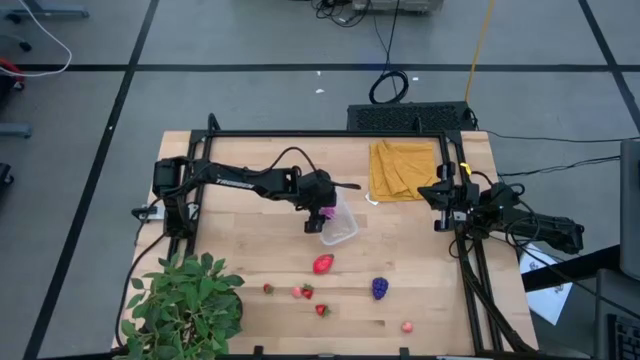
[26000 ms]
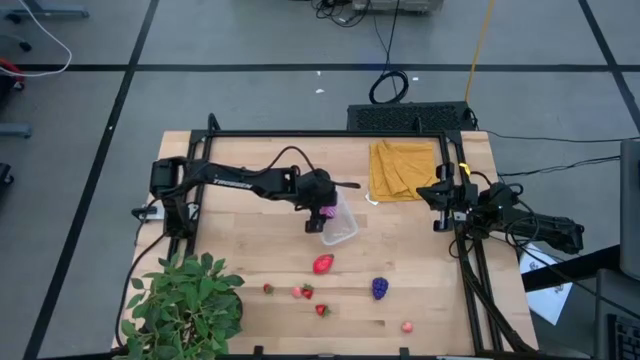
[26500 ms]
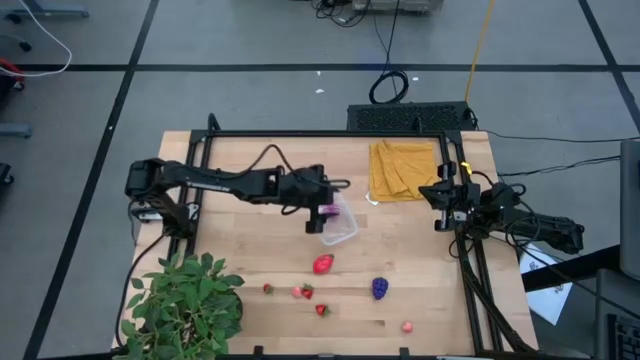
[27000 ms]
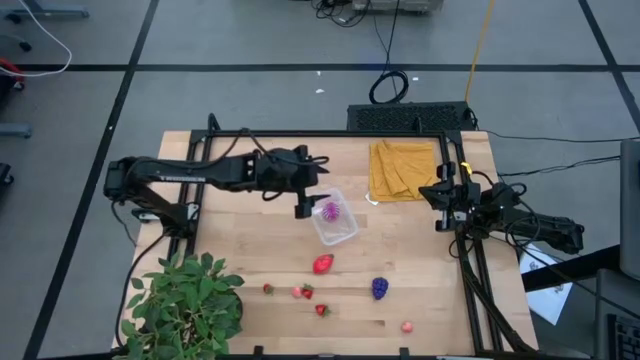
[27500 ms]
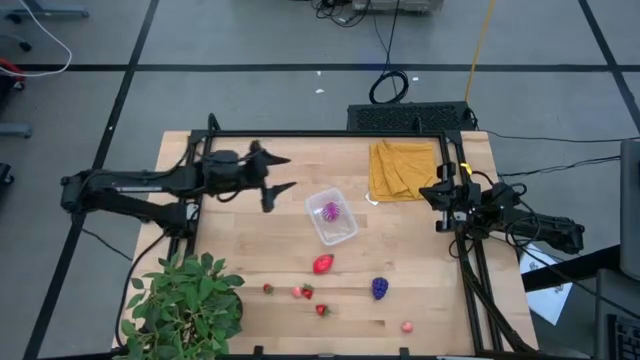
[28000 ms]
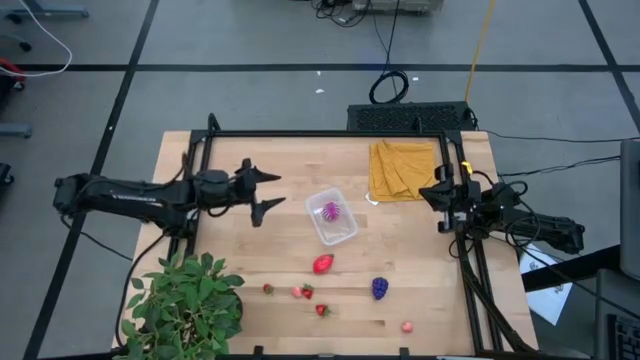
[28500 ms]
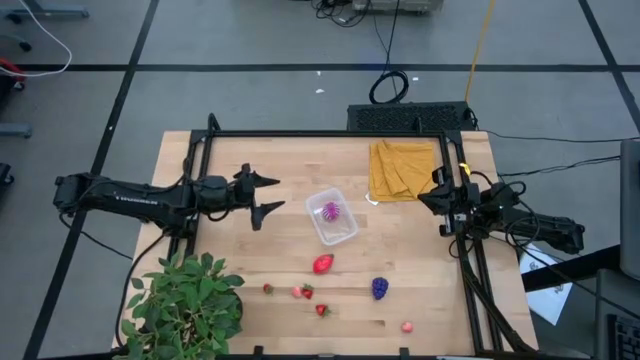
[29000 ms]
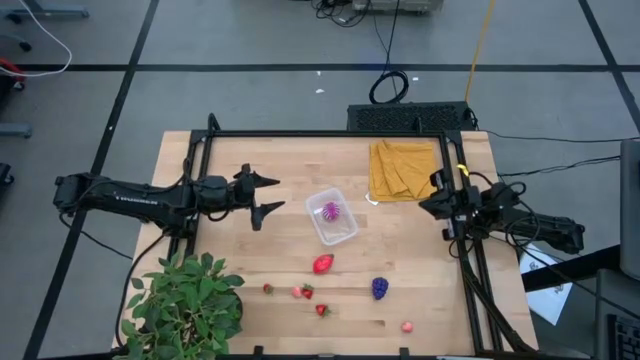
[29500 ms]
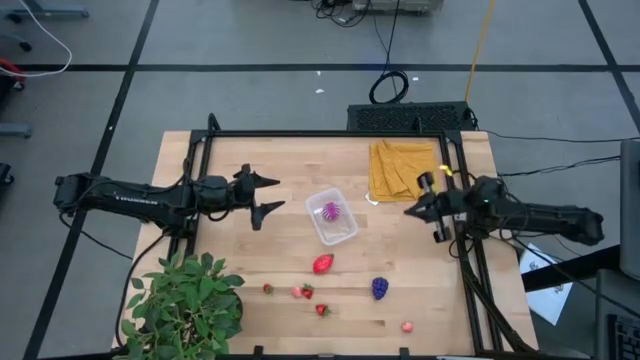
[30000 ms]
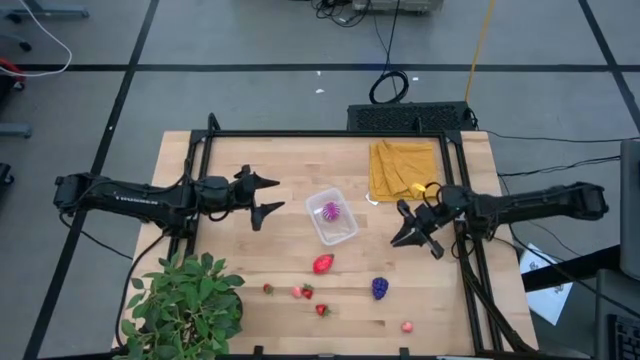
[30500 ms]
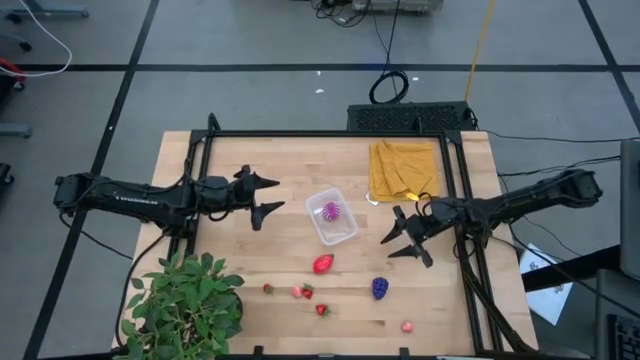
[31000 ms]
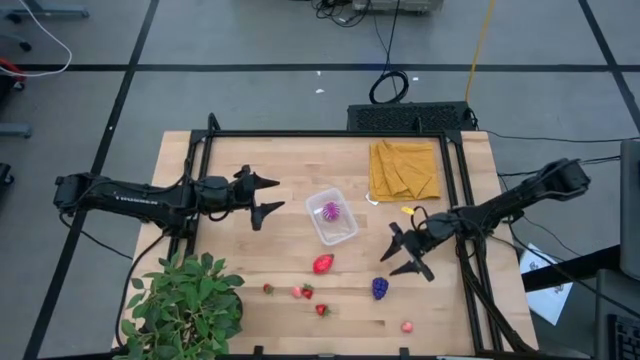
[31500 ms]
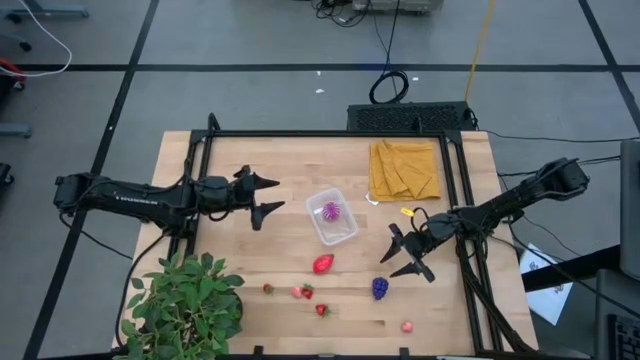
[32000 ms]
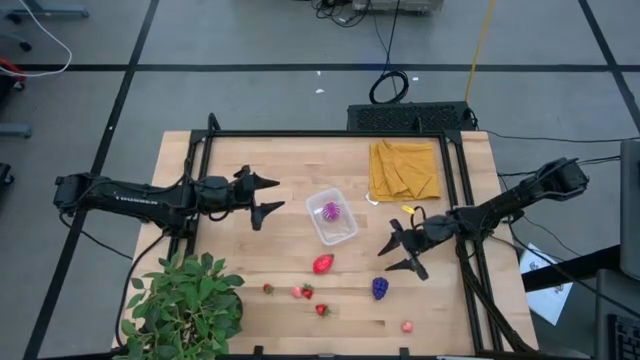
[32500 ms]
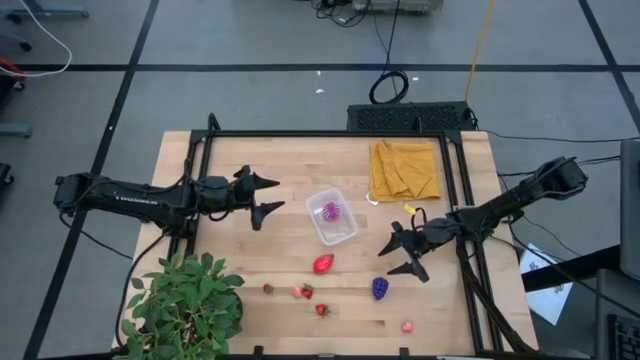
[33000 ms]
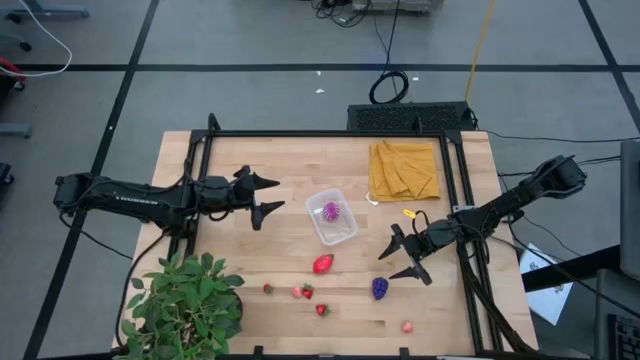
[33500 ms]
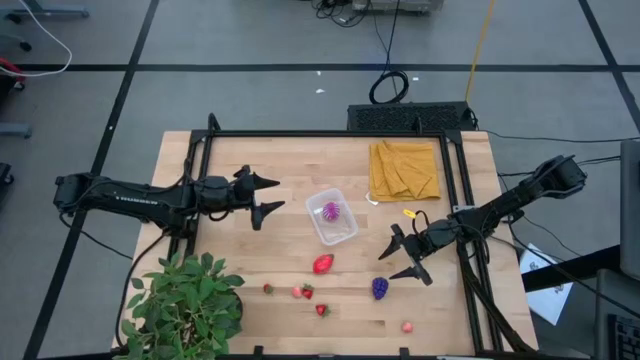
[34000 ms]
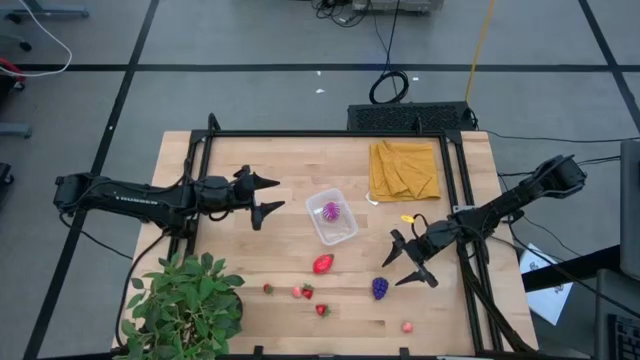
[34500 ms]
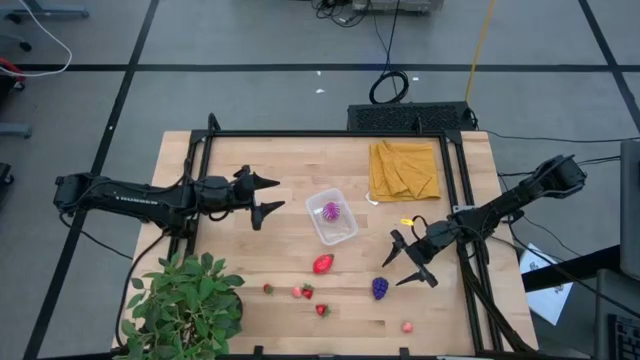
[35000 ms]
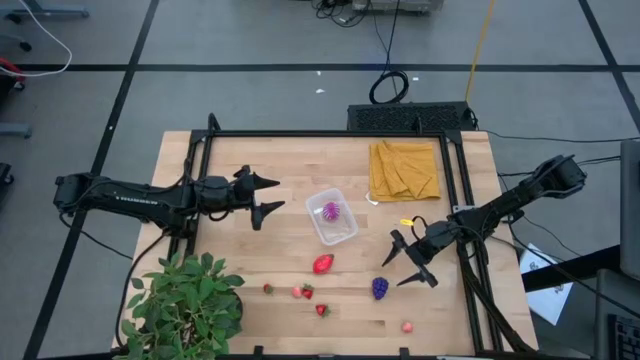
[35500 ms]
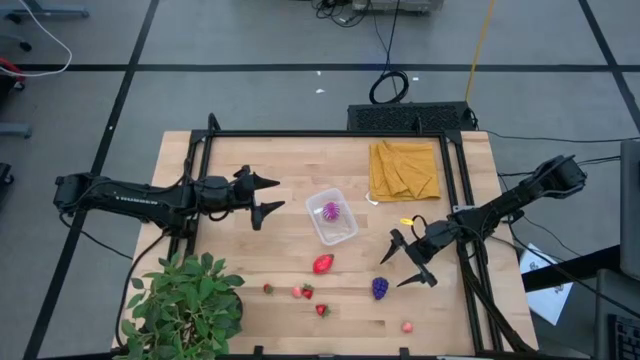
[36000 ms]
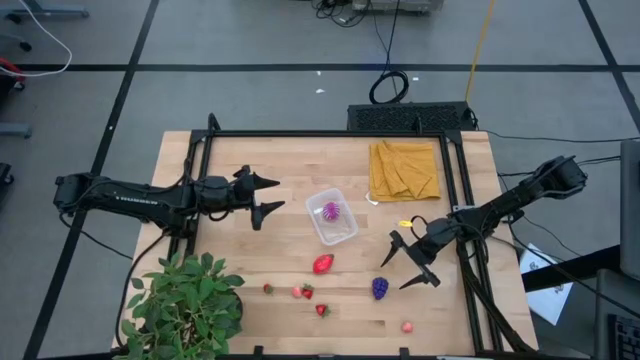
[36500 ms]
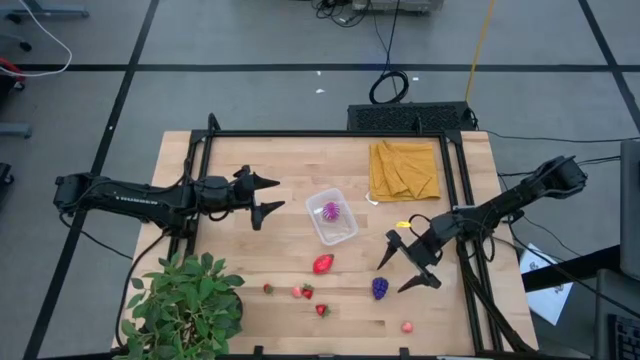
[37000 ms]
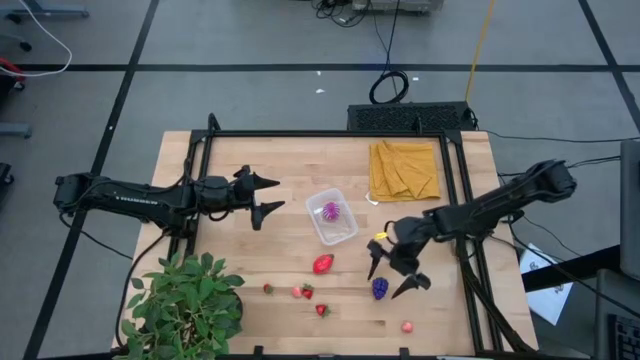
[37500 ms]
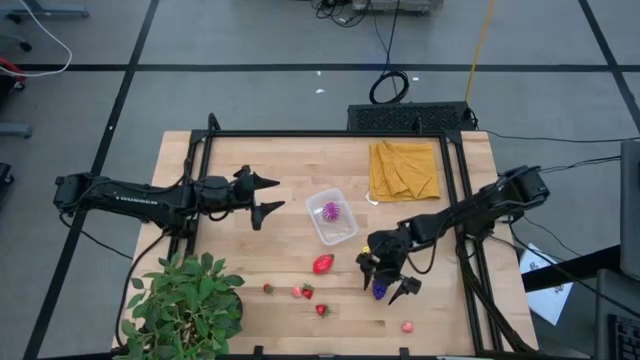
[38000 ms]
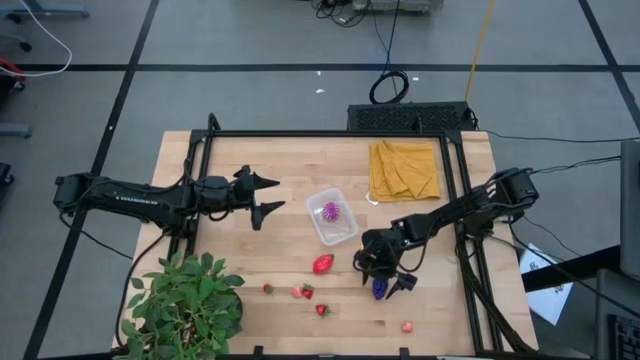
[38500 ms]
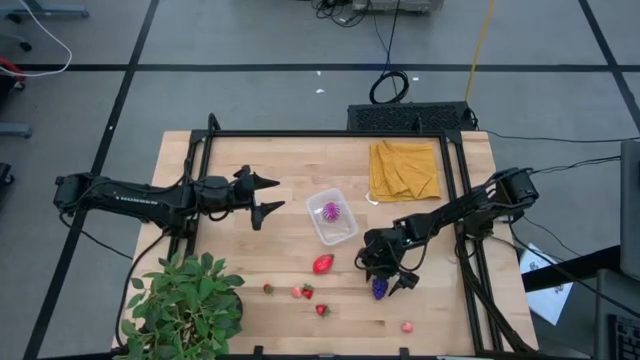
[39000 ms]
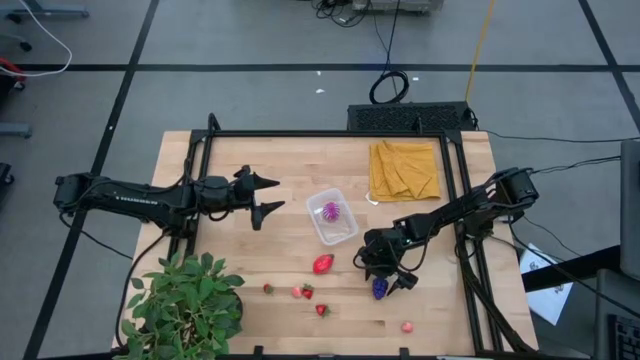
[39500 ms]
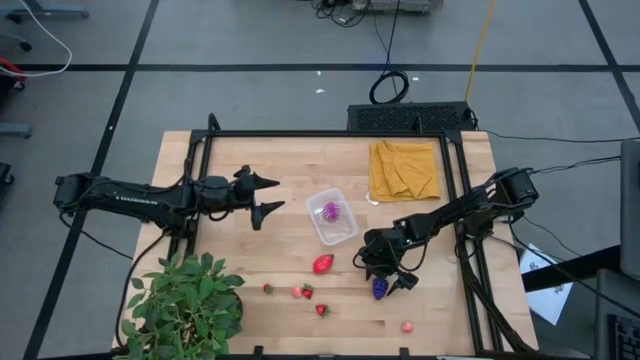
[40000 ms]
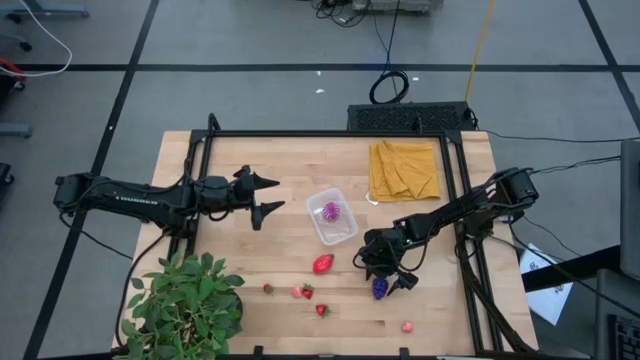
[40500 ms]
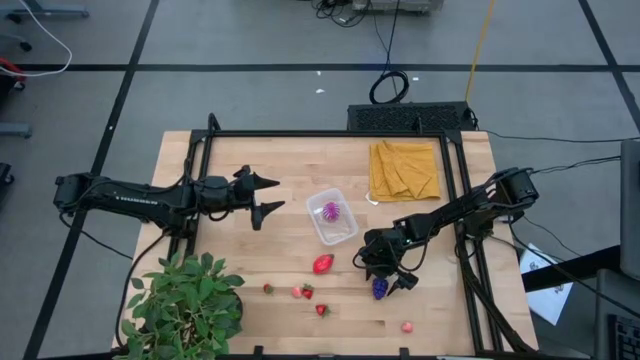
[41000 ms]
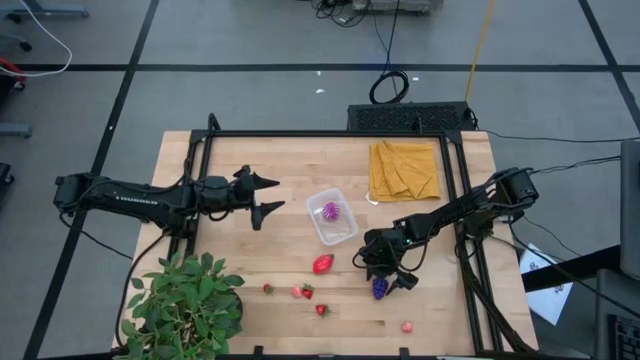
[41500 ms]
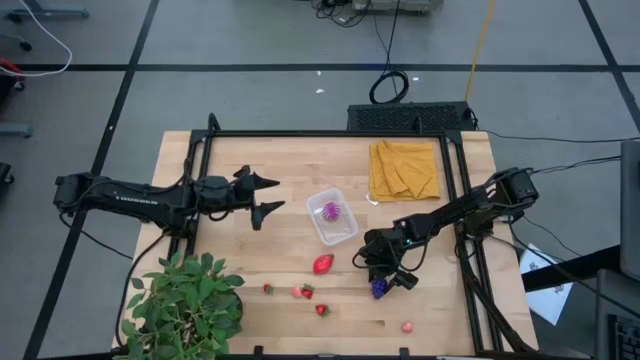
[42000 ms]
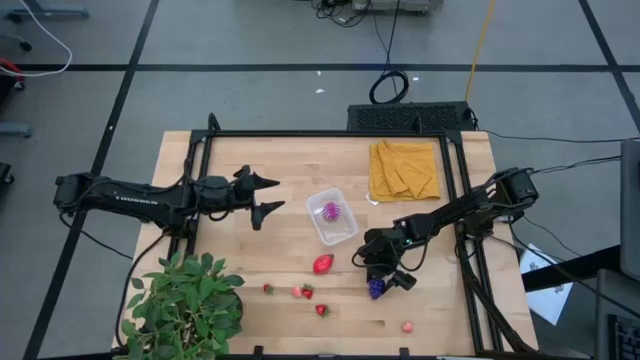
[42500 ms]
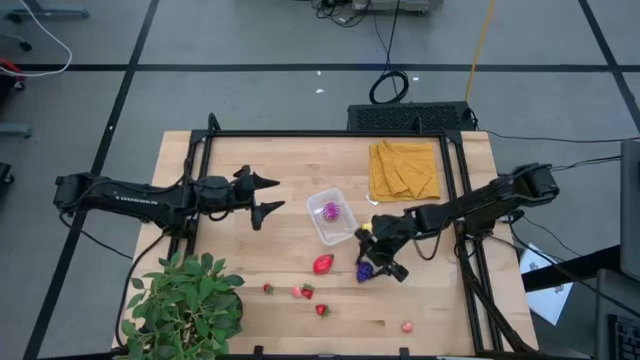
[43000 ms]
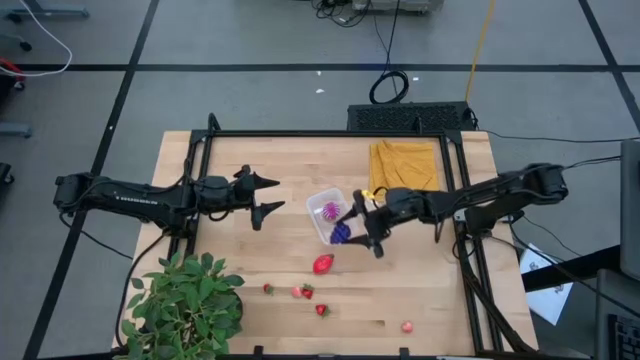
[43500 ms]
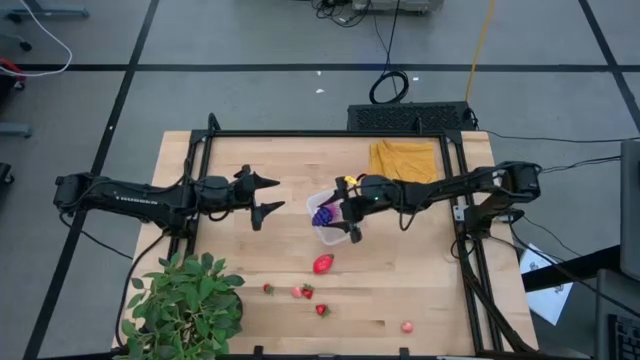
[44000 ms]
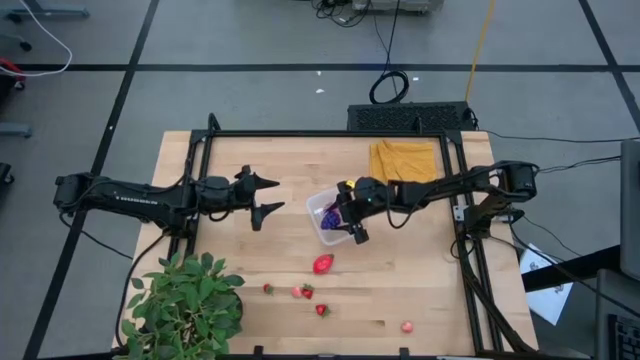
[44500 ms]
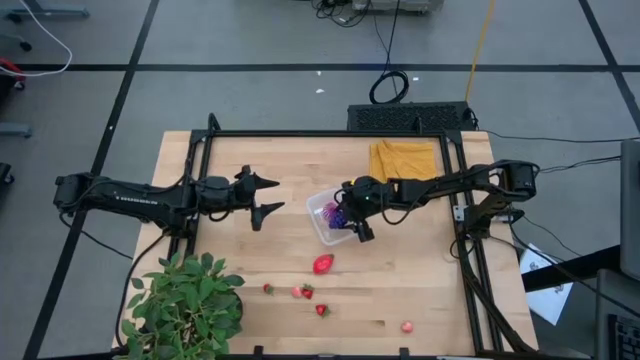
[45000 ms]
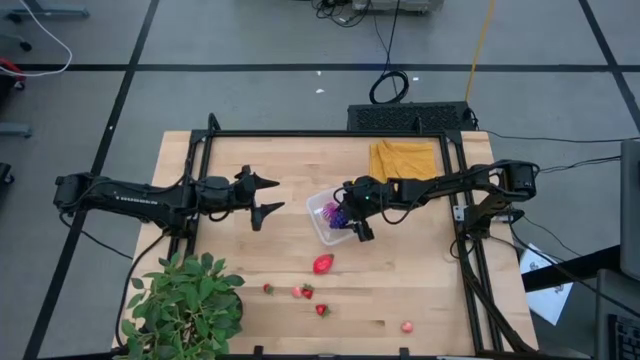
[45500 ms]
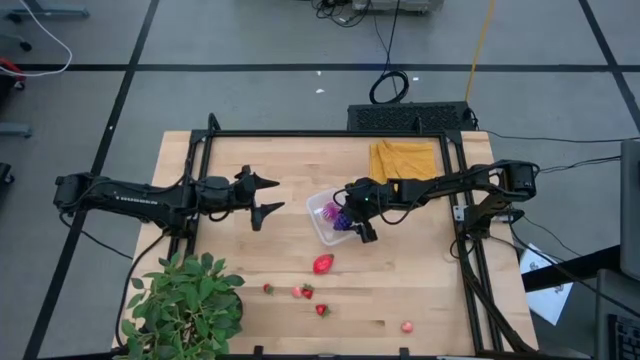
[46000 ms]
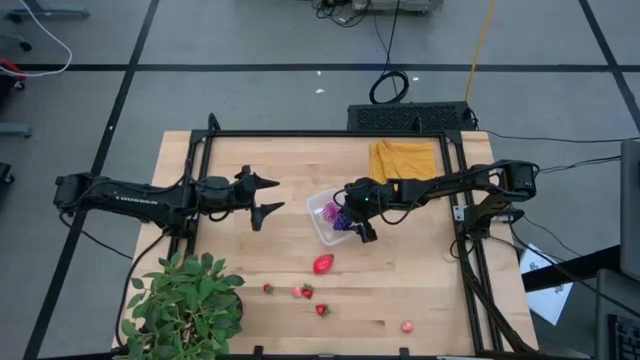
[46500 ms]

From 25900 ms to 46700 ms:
Task: Pick and placing Produce into tupperware
Put the purple grape into the transparent container
